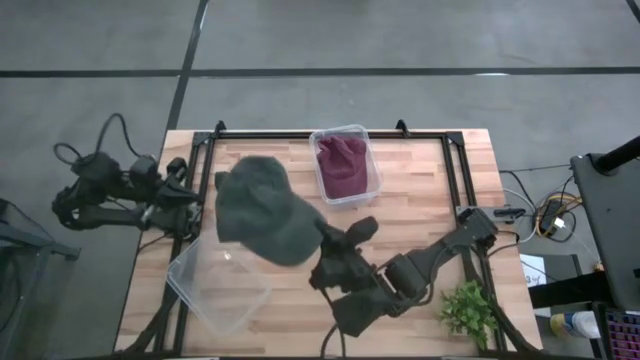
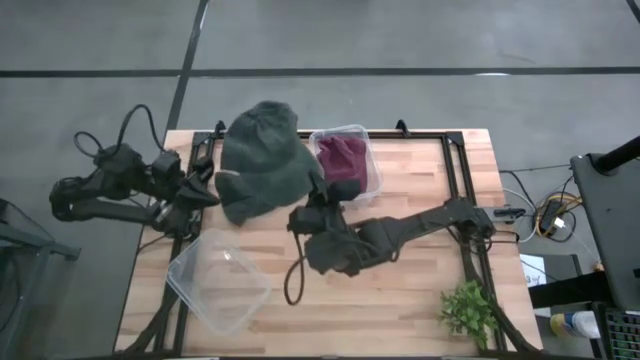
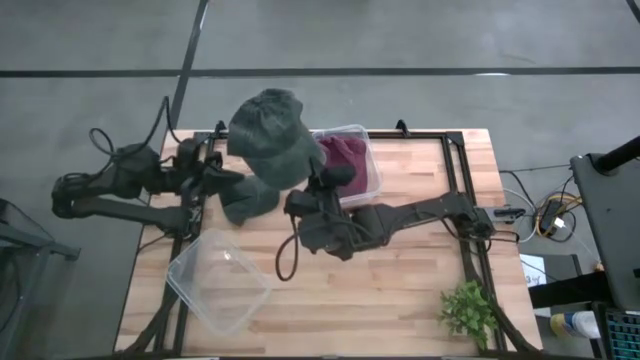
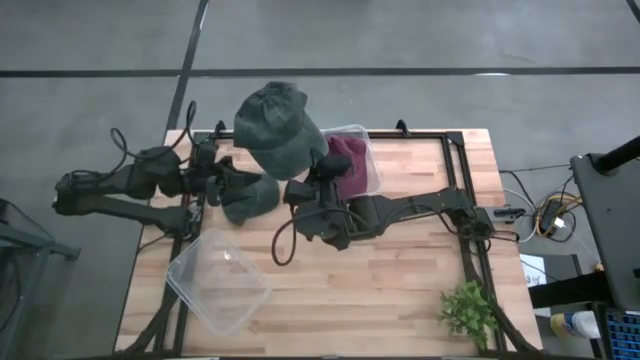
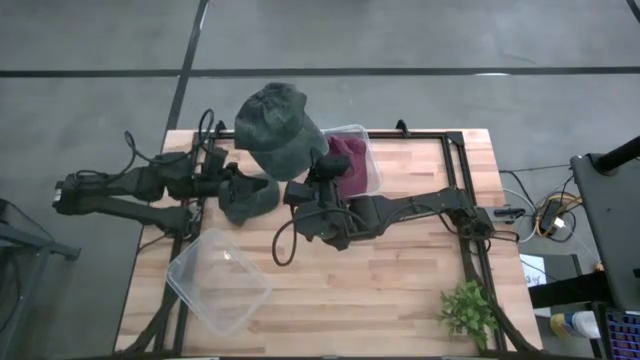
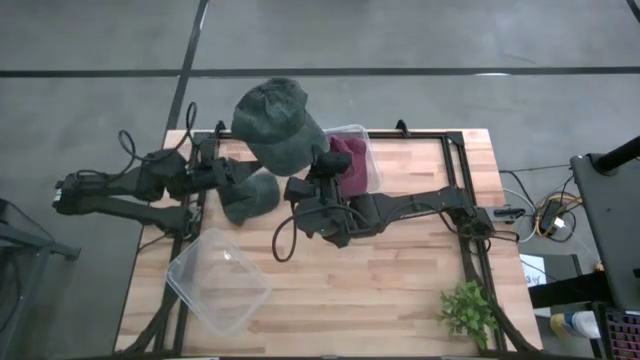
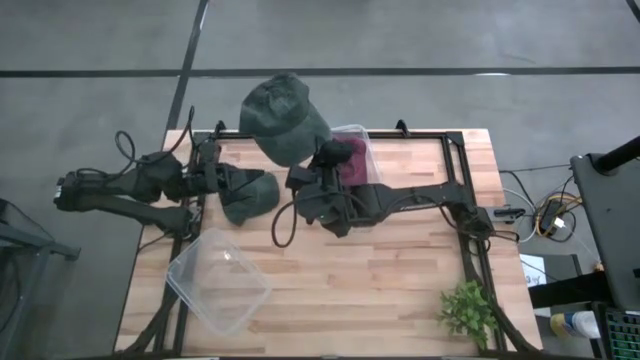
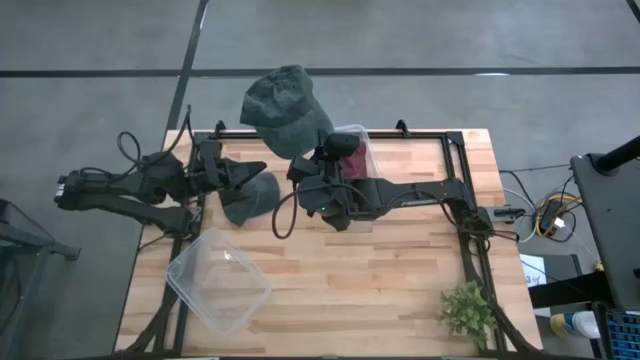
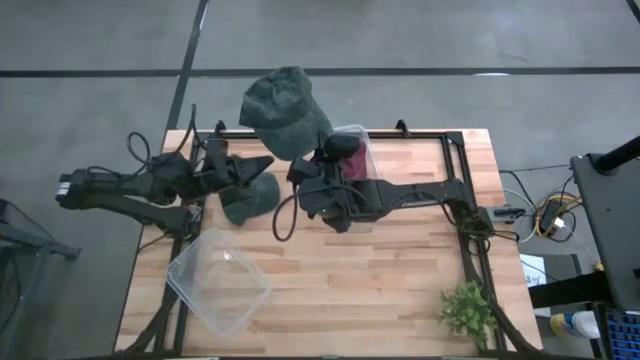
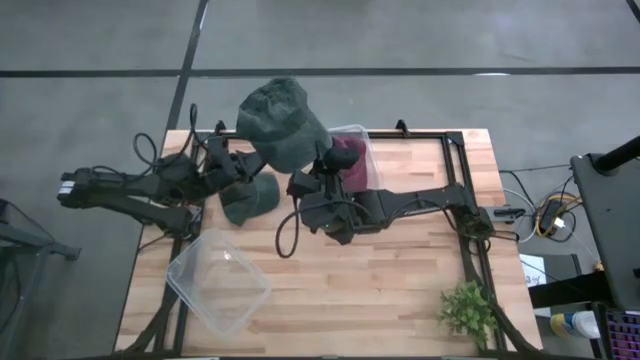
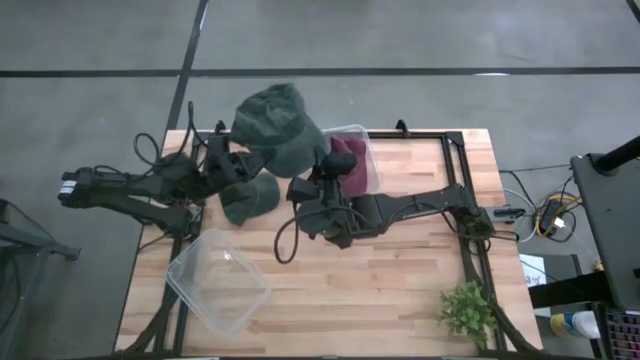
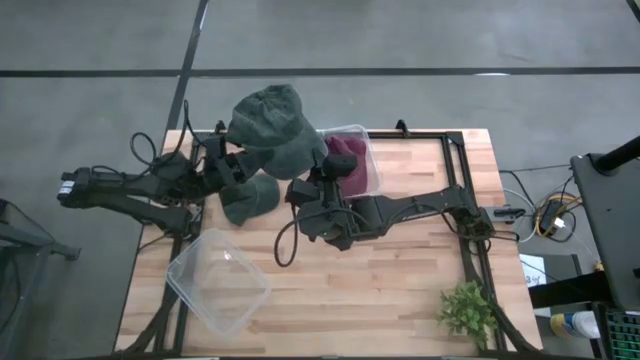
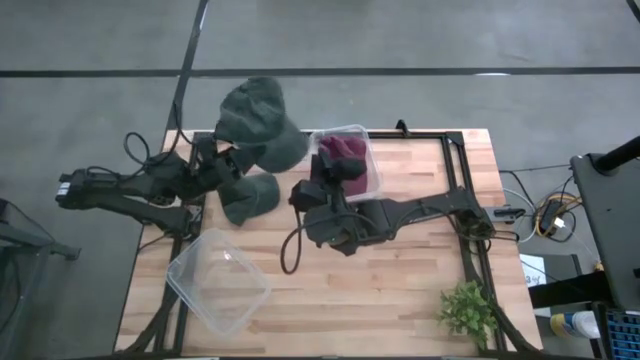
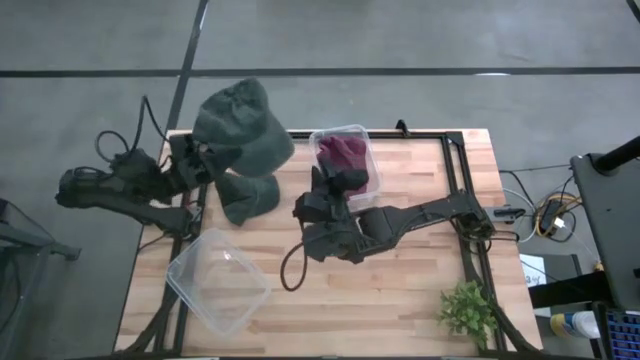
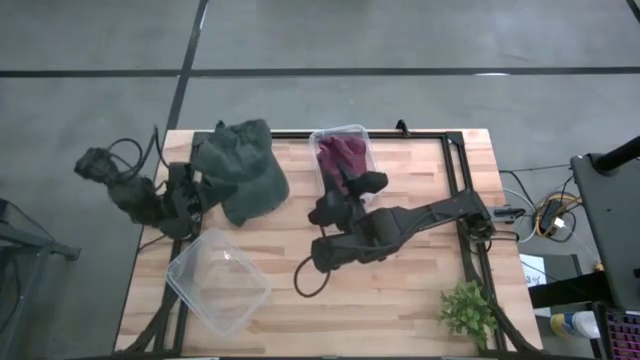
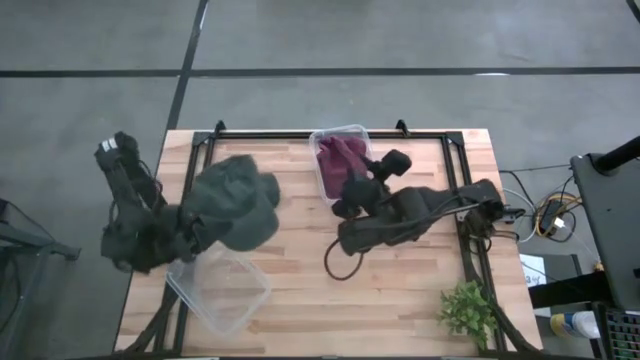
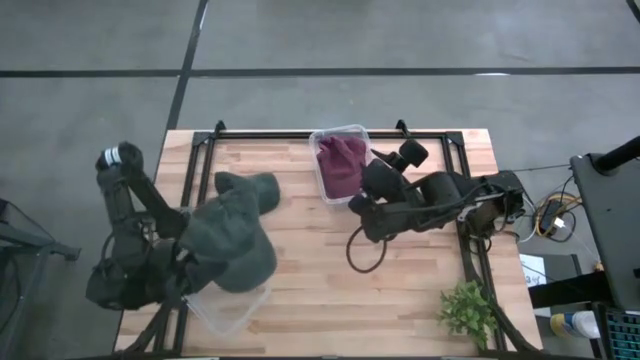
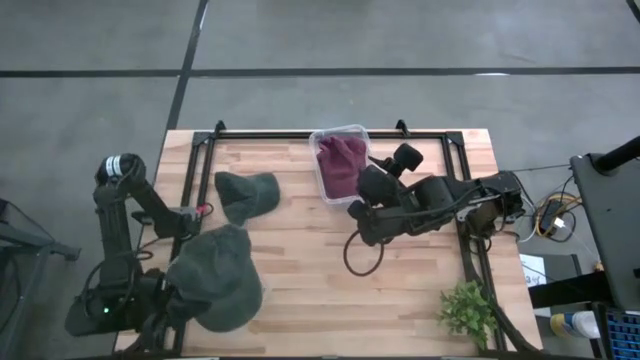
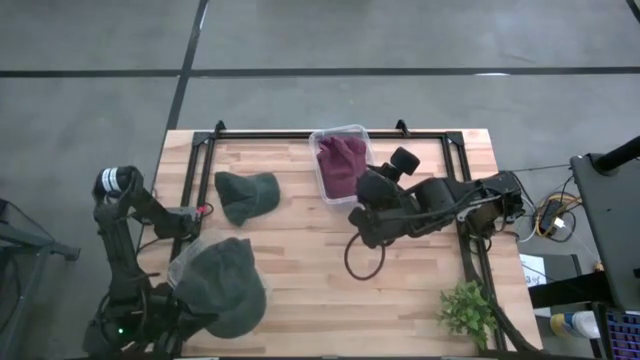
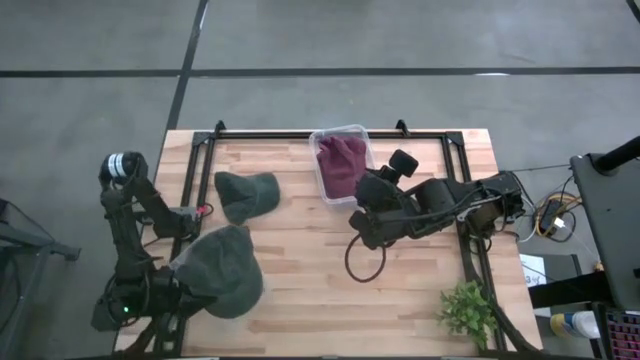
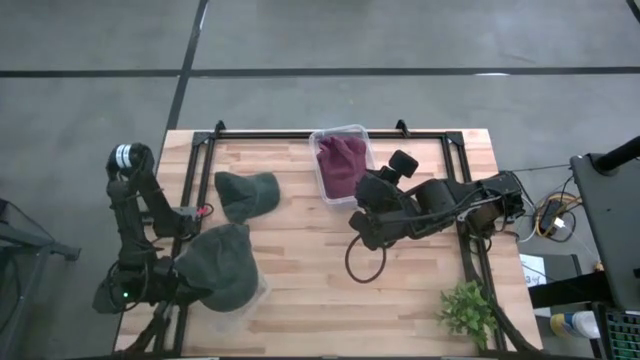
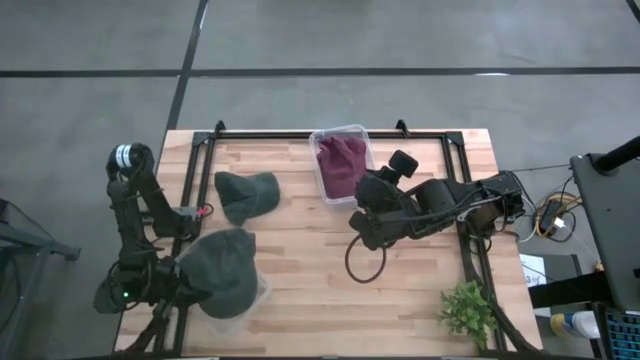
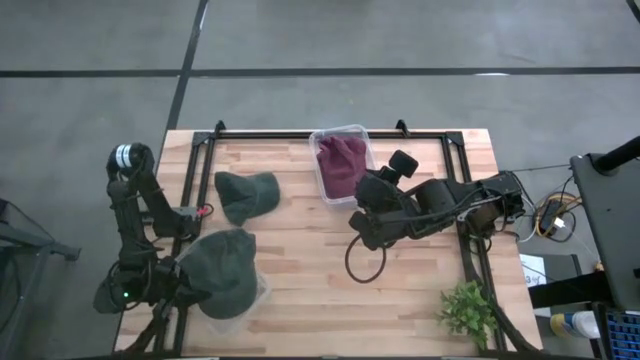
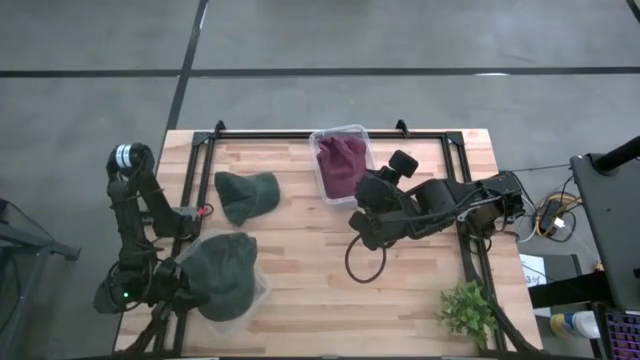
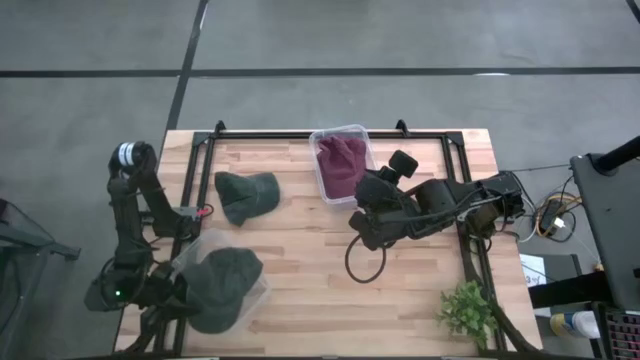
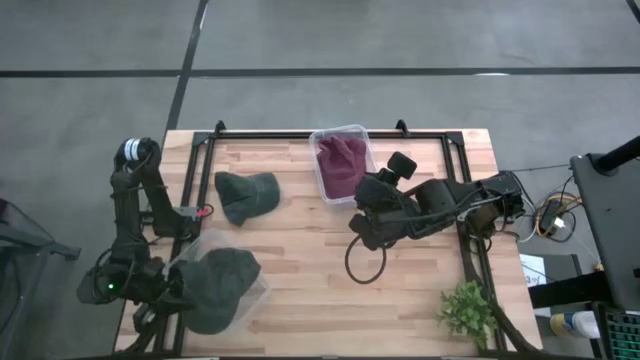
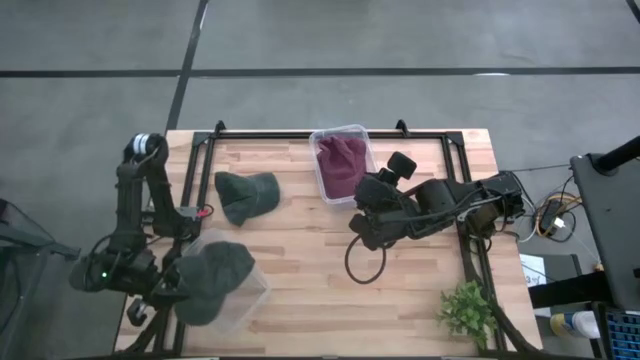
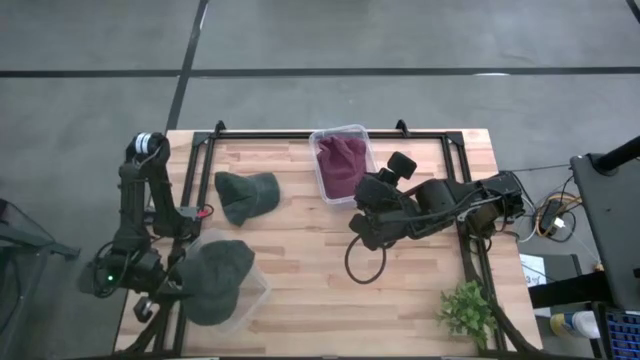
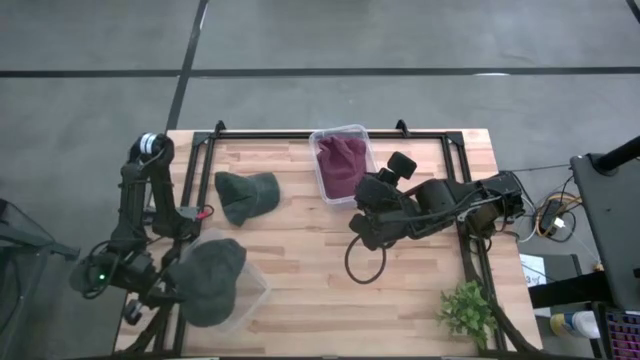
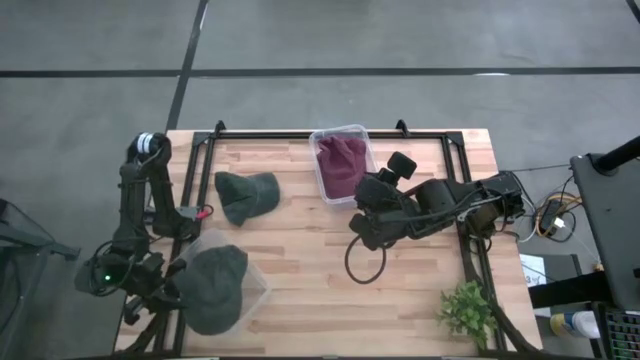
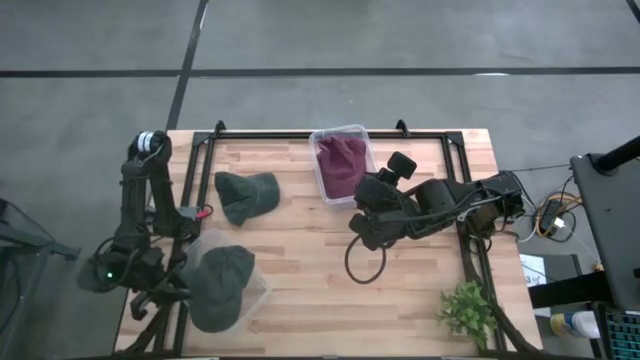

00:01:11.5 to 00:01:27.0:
Task: Pick & Place hat
Put the green cap into the bottom transparent bin

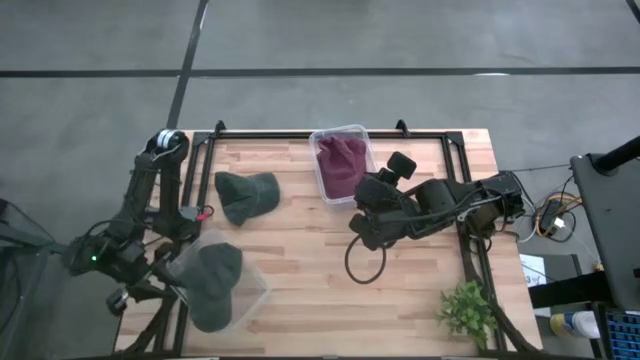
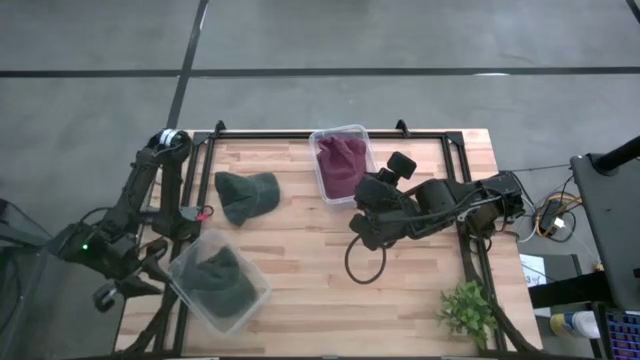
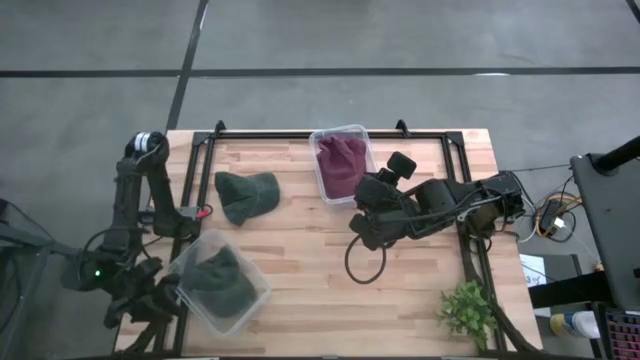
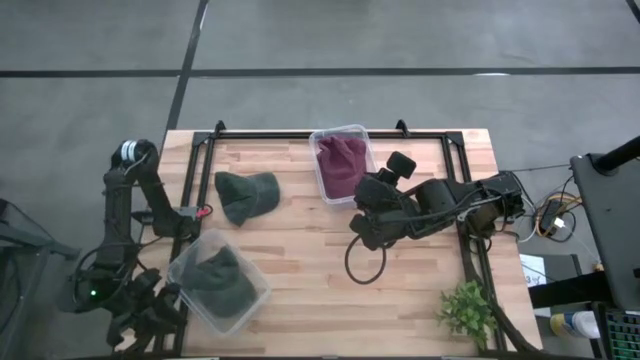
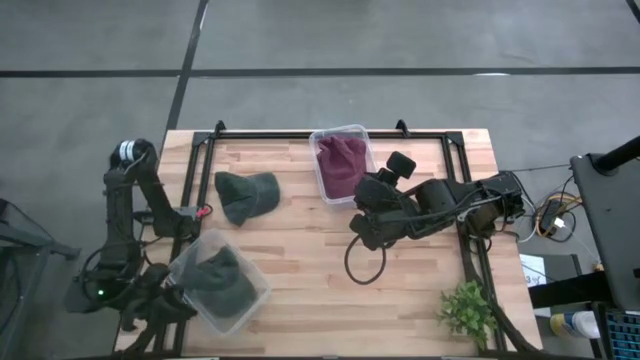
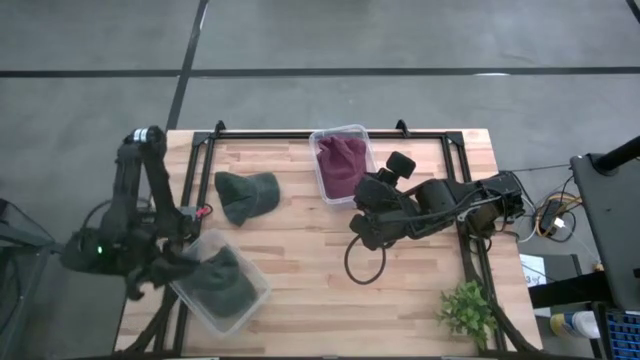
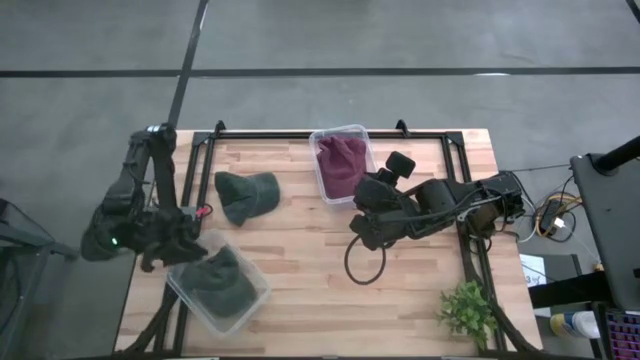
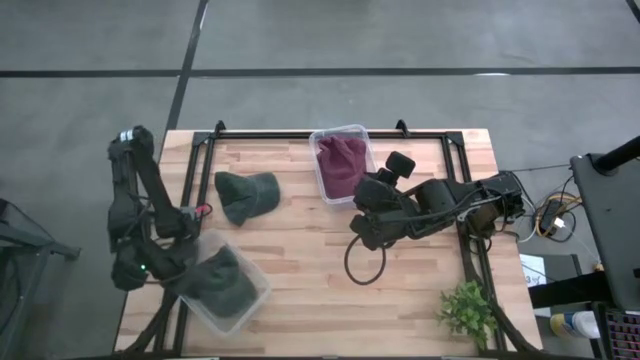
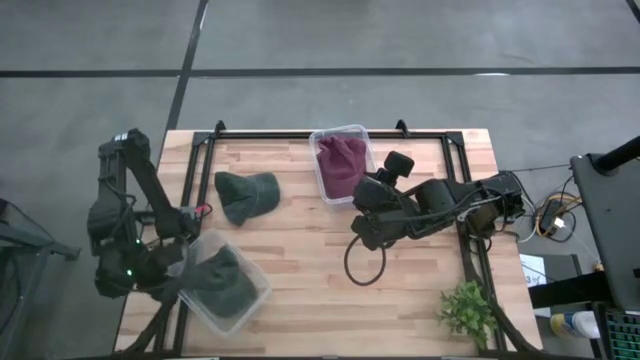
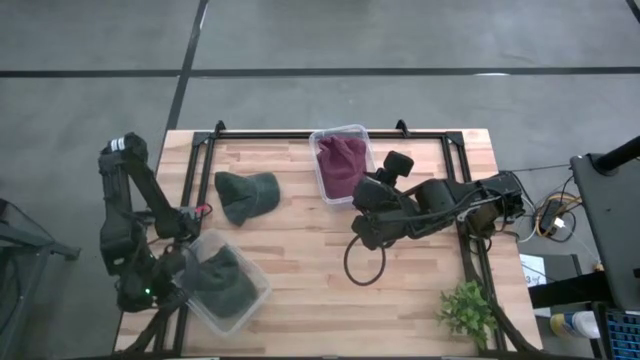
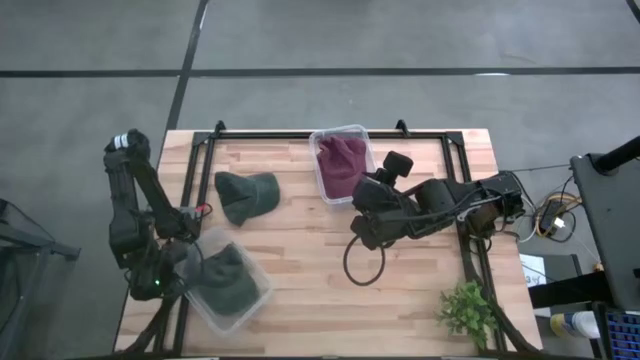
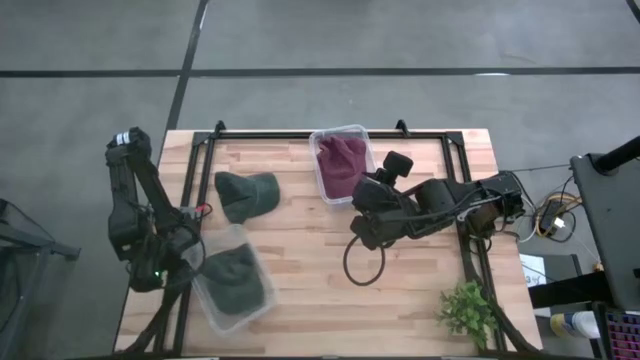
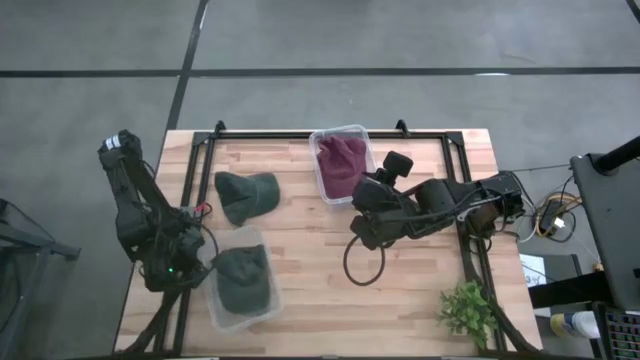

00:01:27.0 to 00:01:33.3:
Adjust the bottom transparent bin
